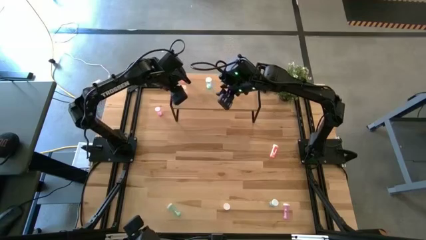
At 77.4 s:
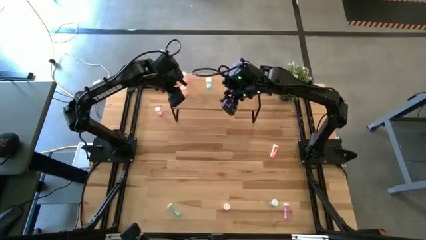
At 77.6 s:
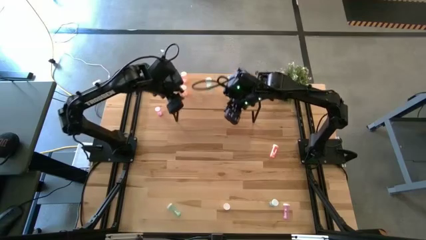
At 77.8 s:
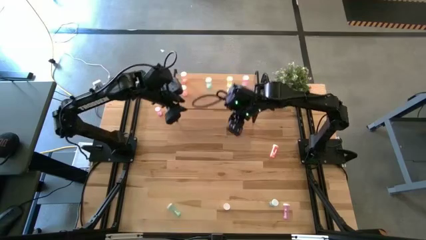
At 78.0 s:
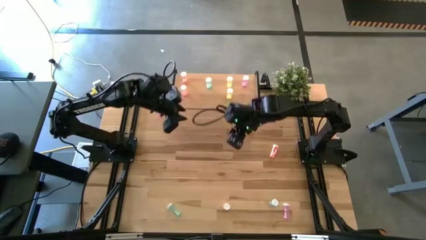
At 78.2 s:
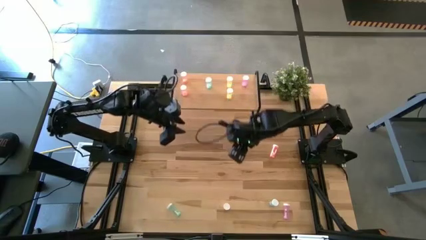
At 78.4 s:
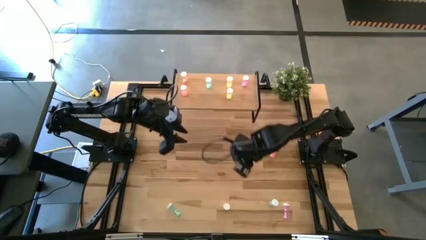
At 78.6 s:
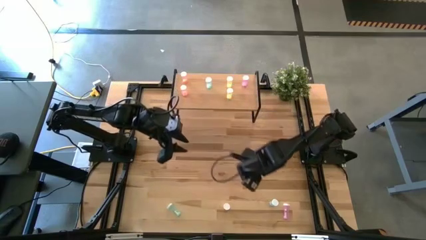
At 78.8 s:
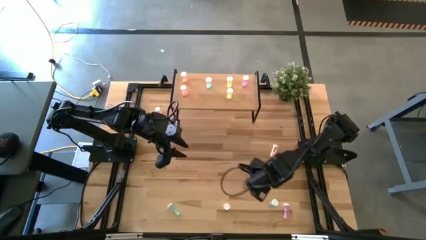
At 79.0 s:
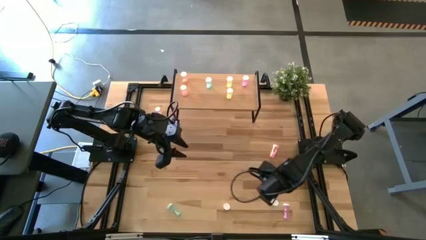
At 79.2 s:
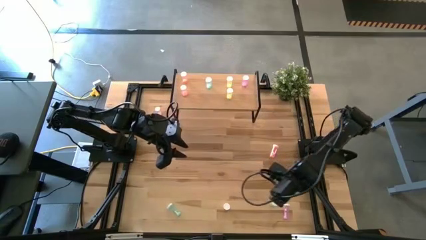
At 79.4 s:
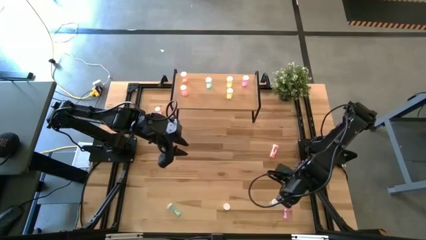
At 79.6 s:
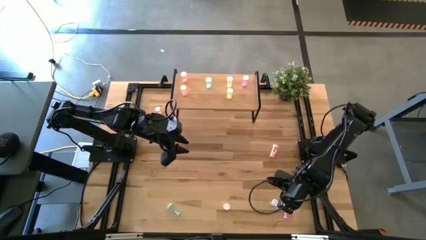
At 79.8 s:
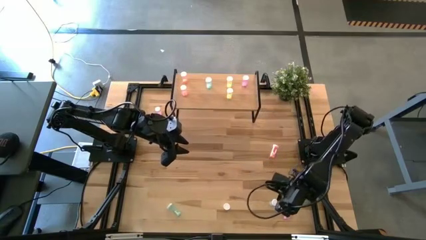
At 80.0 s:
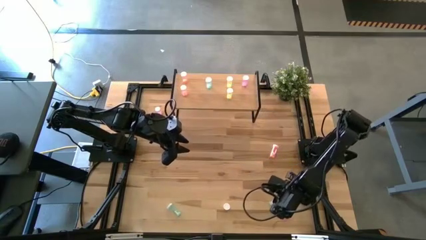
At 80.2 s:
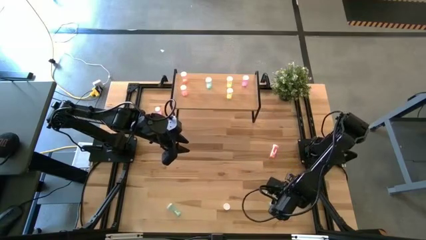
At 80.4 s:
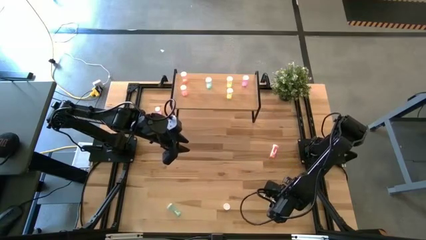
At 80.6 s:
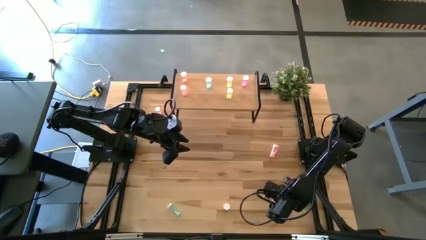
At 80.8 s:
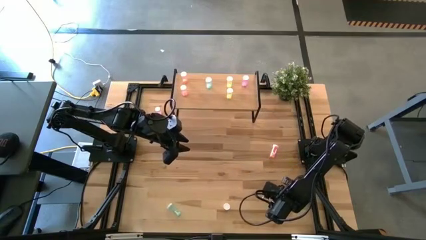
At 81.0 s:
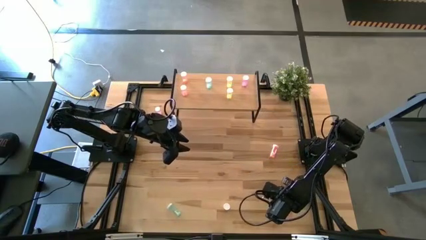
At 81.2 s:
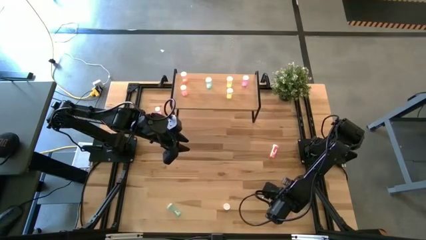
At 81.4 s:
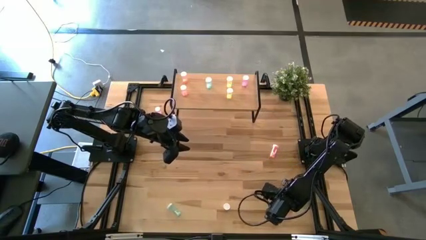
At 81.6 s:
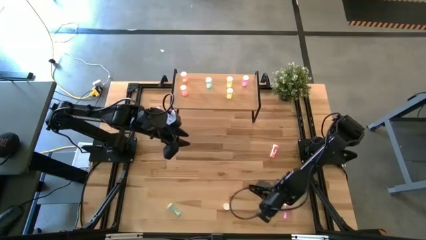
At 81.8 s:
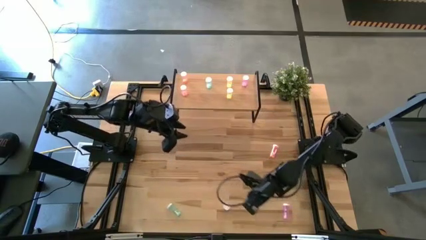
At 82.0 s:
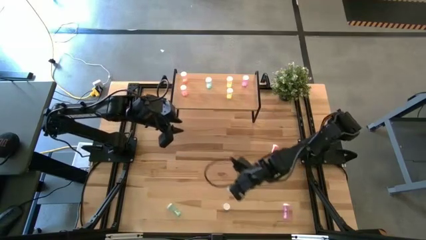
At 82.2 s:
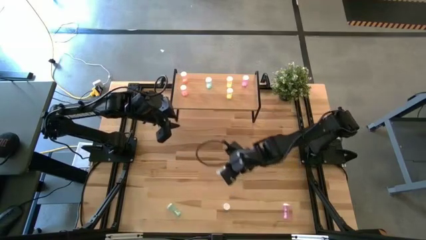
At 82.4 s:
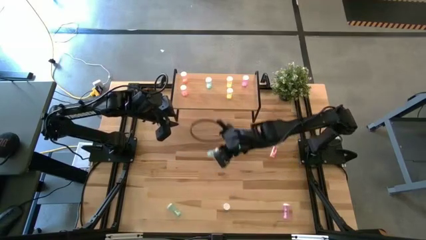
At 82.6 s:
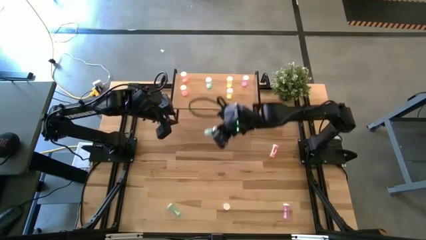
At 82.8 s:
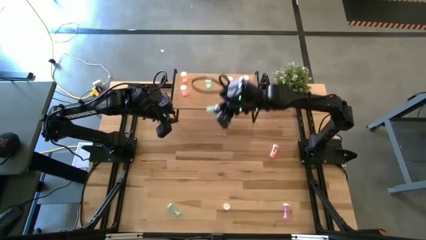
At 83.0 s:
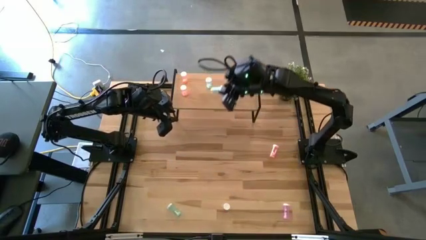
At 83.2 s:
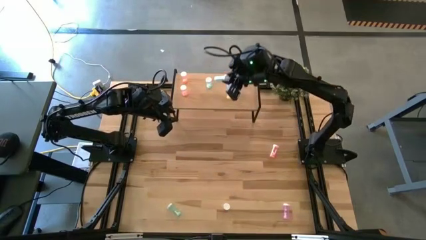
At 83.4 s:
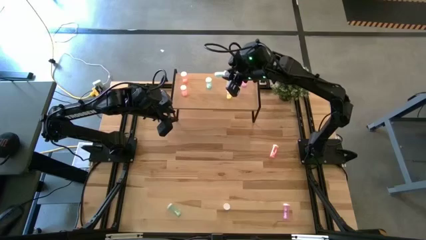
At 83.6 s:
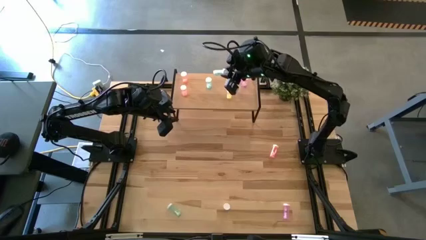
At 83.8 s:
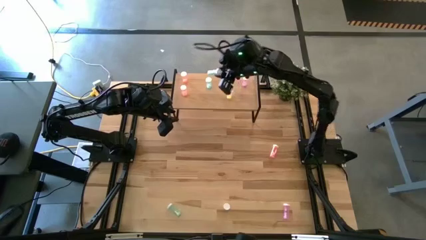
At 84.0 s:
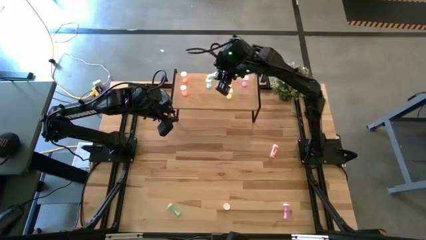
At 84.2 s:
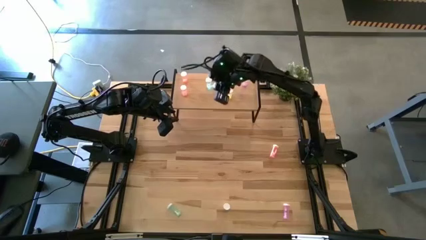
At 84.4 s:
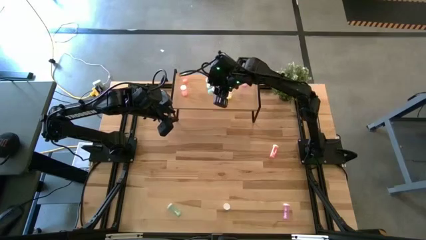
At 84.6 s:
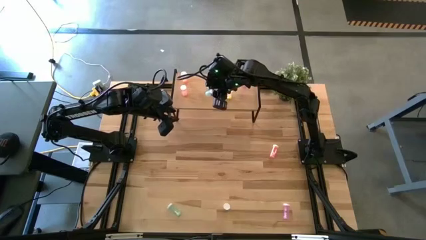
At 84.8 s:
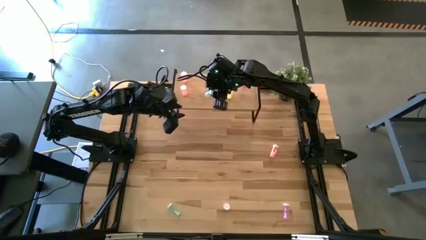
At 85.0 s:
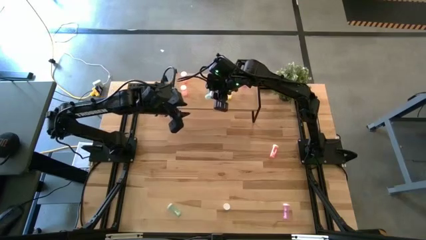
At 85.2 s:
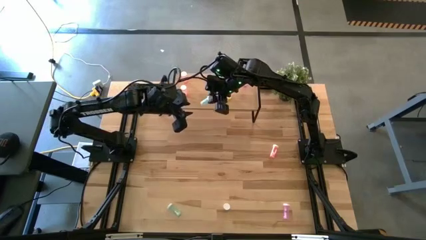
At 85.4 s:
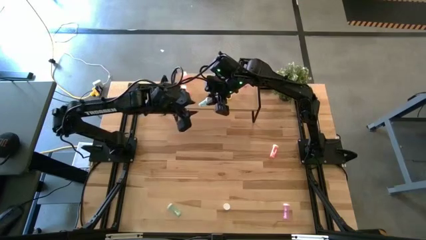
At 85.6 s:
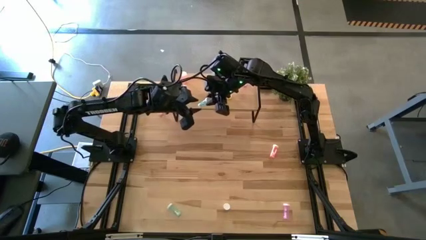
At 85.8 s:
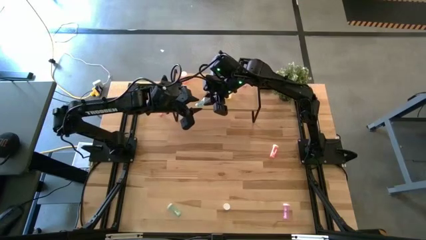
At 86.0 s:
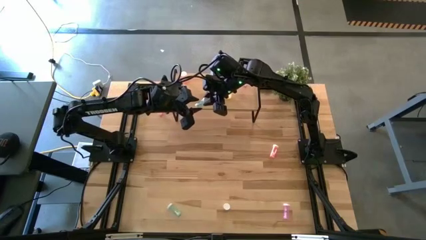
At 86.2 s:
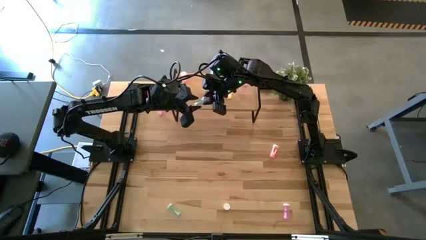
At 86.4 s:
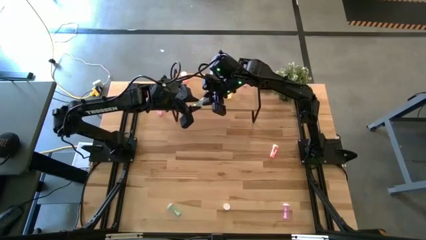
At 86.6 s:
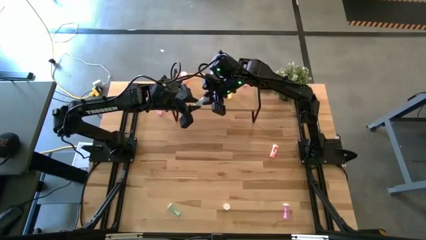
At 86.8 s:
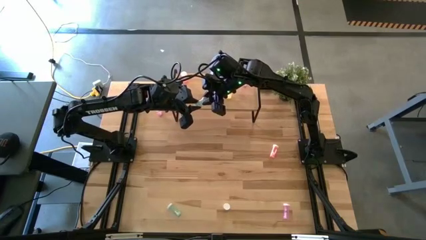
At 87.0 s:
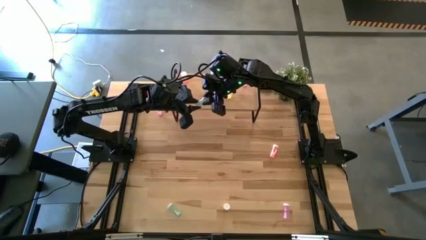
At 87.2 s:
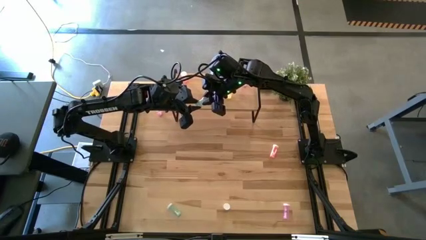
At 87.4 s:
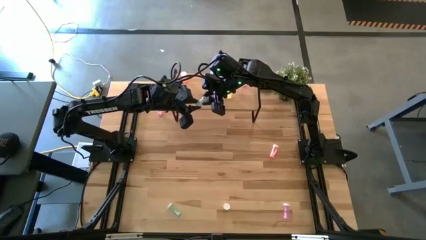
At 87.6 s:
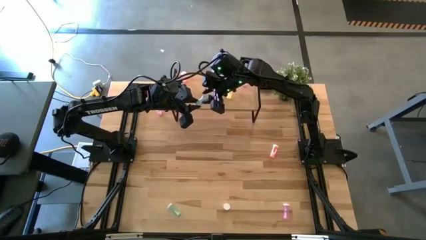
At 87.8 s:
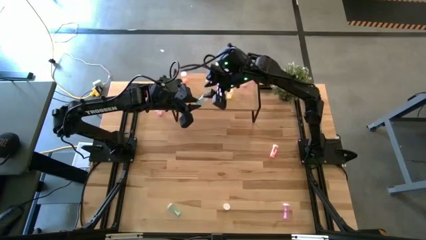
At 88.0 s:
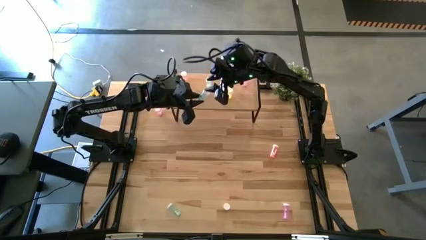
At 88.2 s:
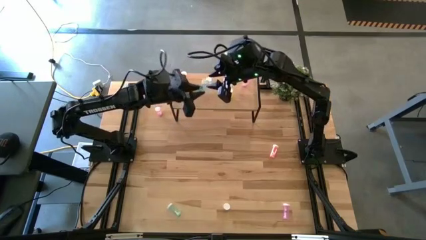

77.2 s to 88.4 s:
Task: Pick and place medicine bottles onto shelf by color
Put the right blue pill bottle on the shelf aligned with the other blue pill bottle
